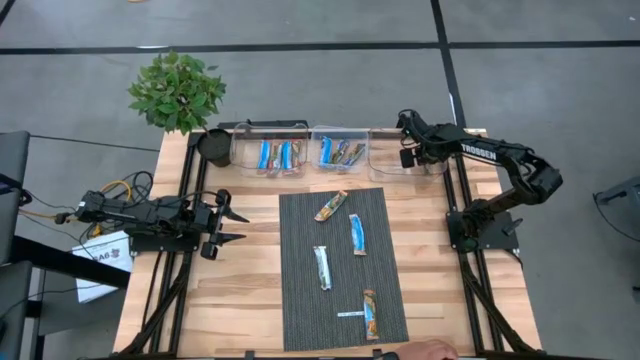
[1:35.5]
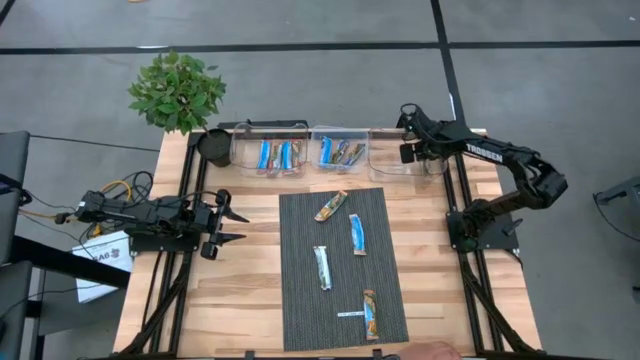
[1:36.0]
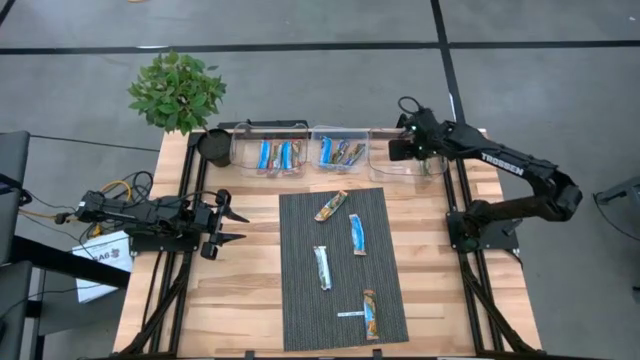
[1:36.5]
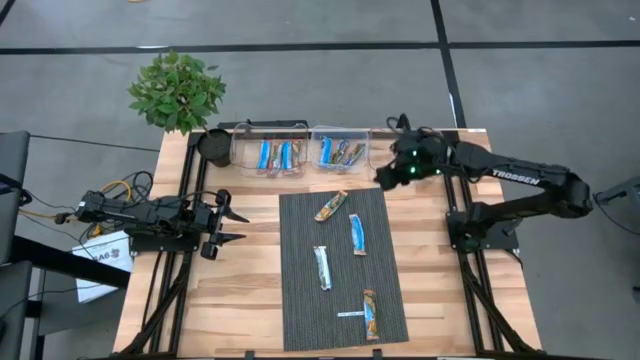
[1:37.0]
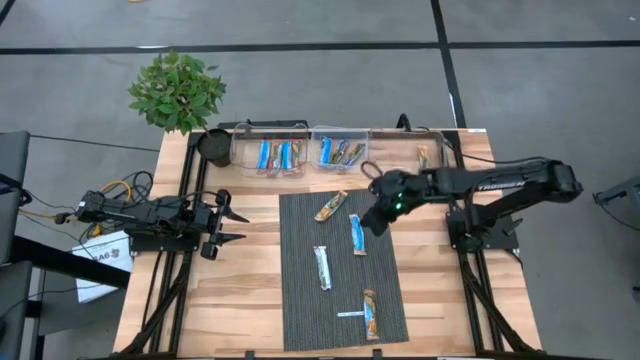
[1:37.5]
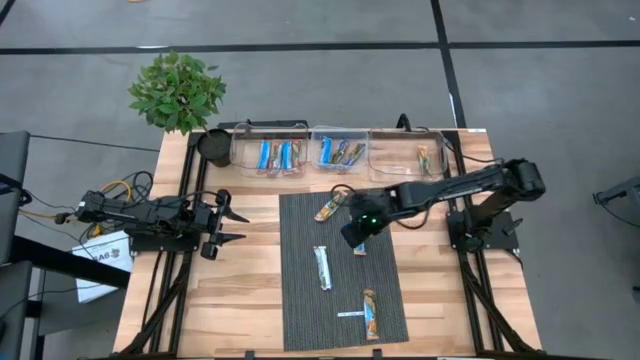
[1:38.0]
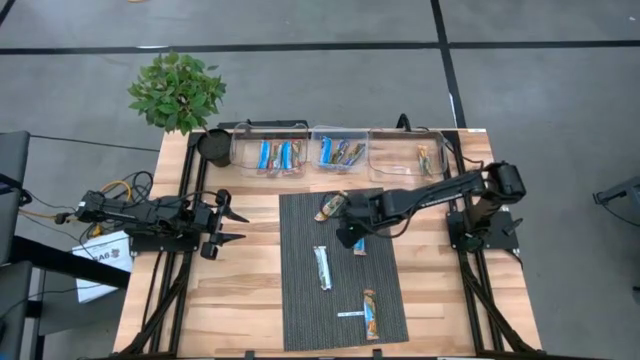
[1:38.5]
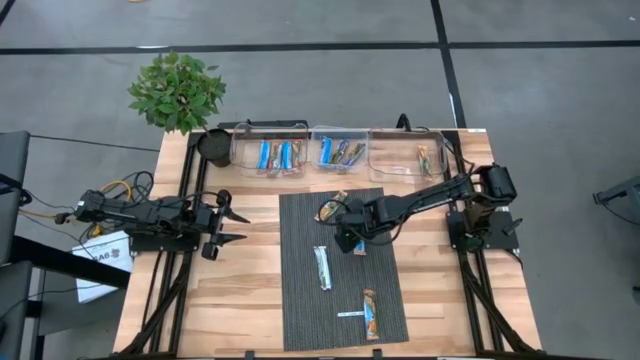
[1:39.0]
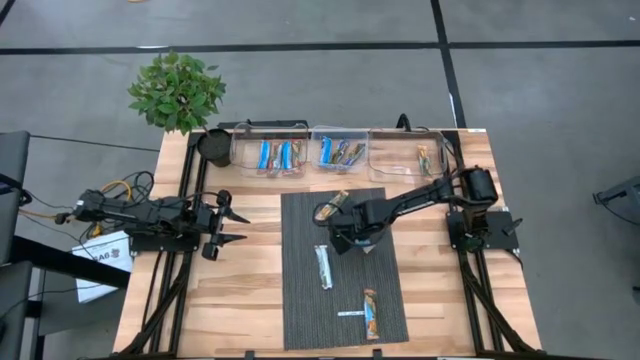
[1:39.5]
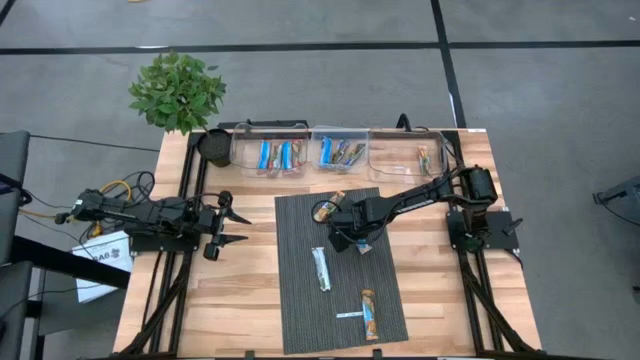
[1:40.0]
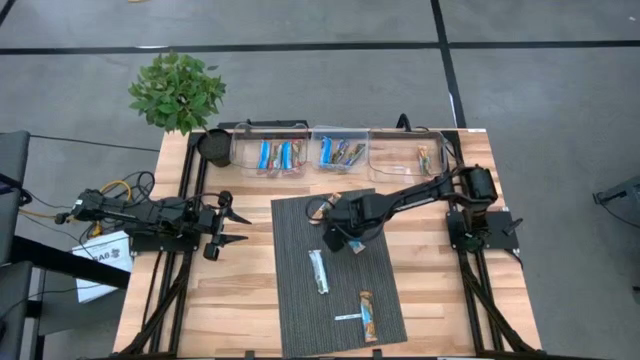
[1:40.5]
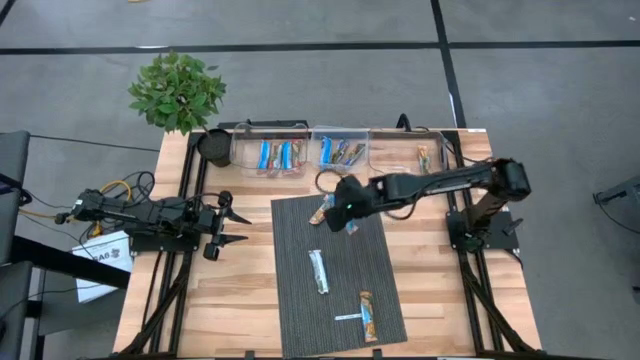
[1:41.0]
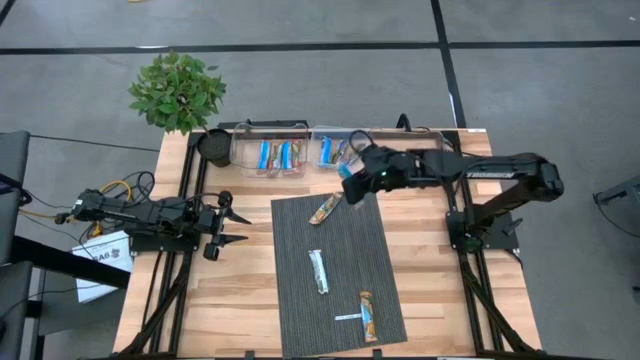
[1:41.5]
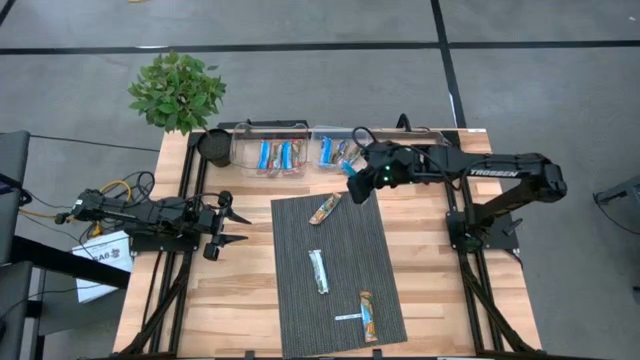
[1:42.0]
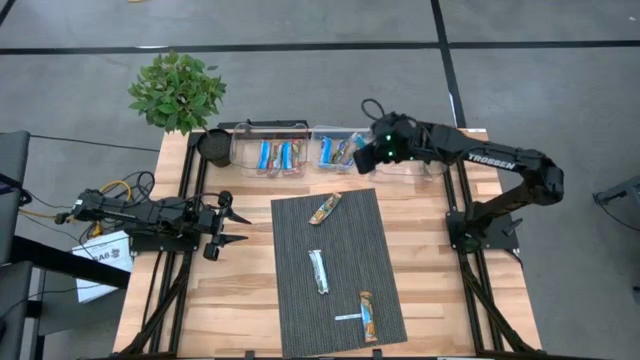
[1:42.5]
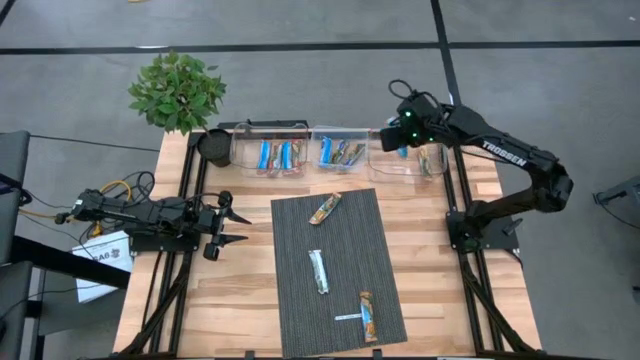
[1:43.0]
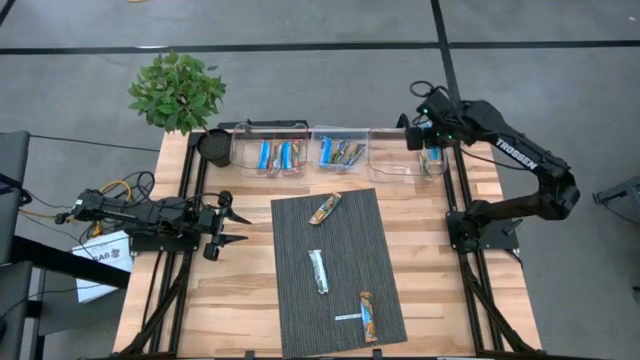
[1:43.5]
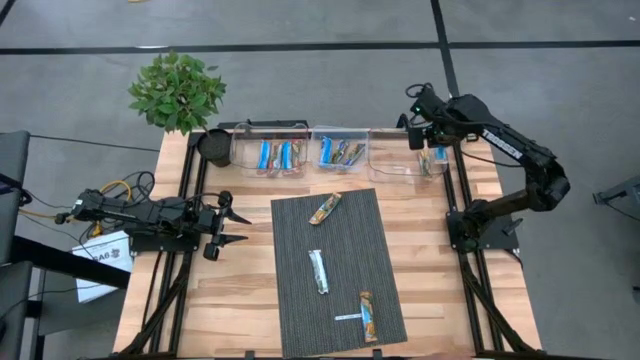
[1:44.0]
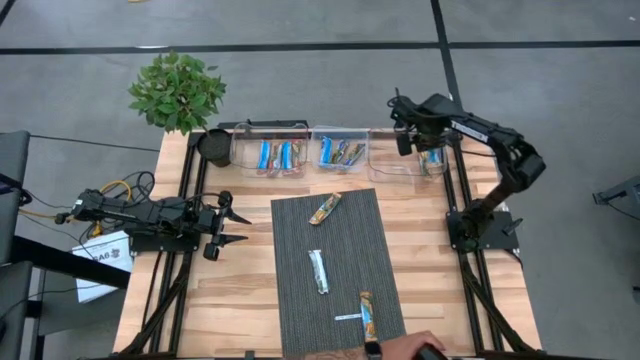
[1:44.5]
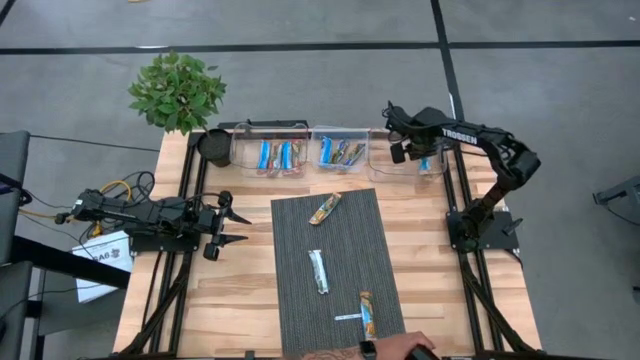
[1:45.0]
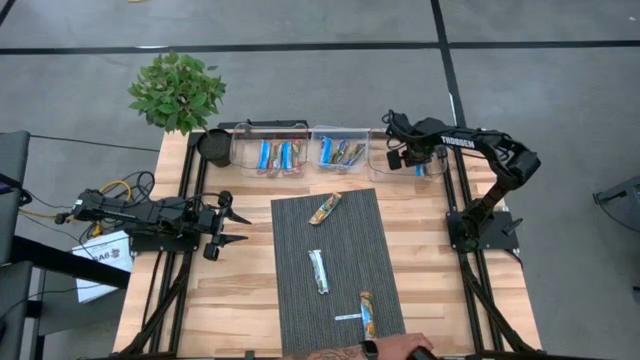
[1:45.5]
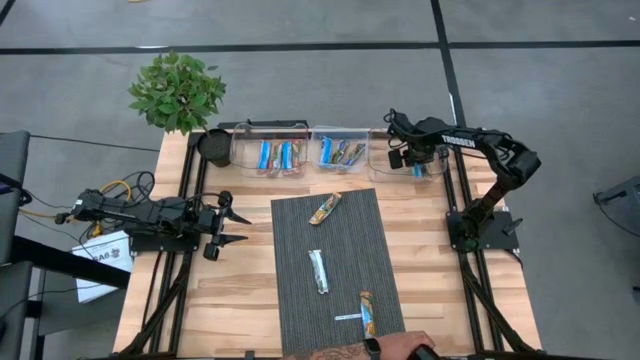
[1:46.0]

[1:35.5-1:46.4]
Task: Pick and place Granola Bars by type
Put the orange granola bar into the right transparent bin

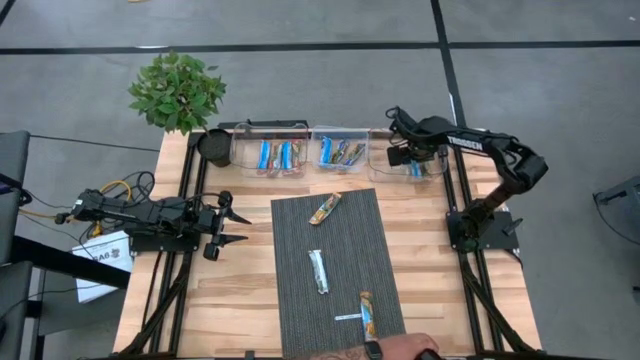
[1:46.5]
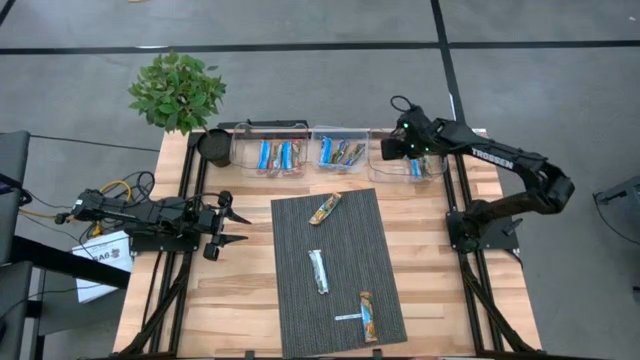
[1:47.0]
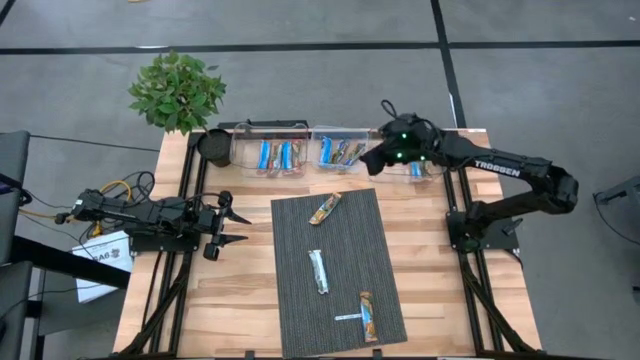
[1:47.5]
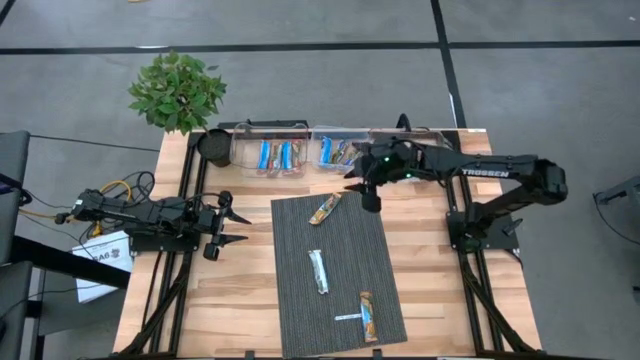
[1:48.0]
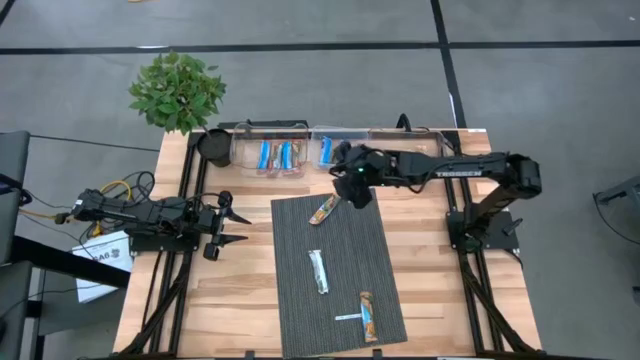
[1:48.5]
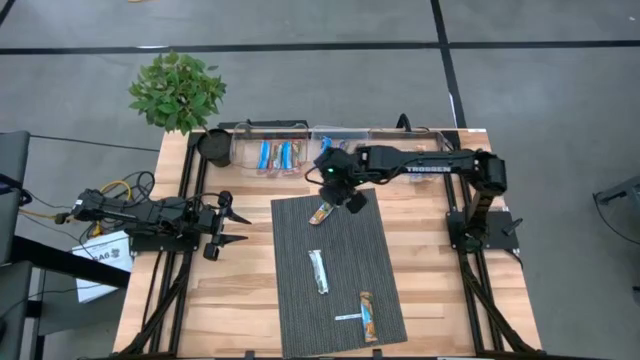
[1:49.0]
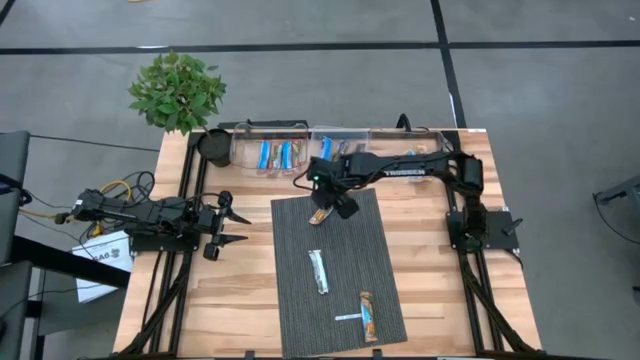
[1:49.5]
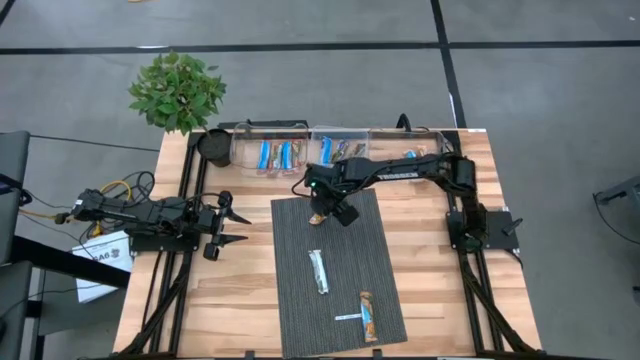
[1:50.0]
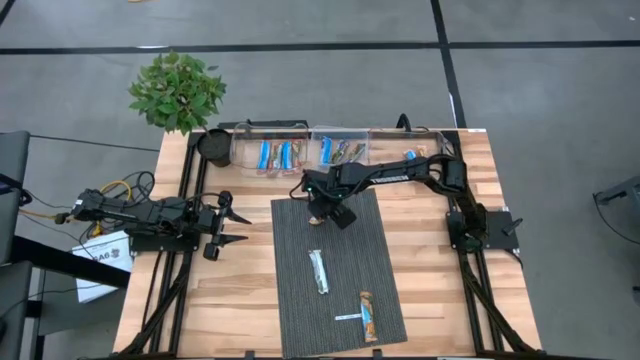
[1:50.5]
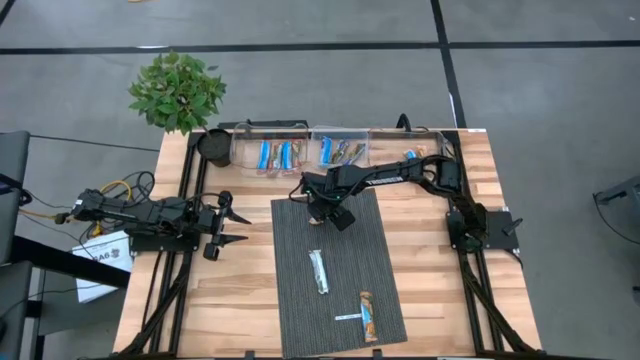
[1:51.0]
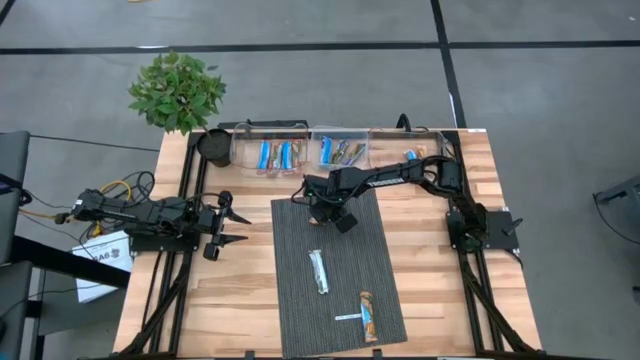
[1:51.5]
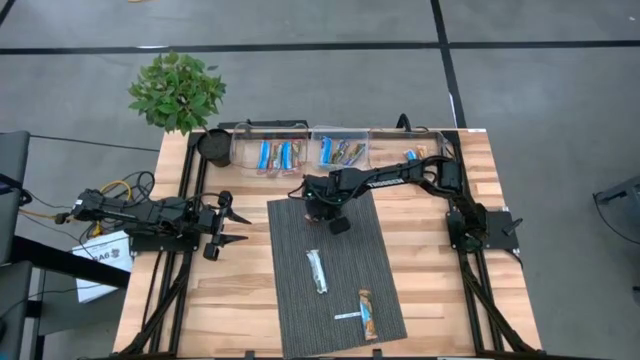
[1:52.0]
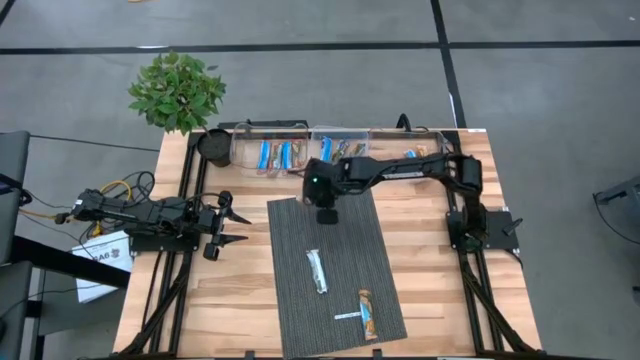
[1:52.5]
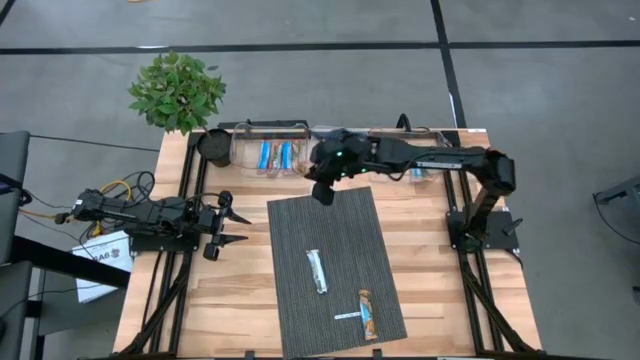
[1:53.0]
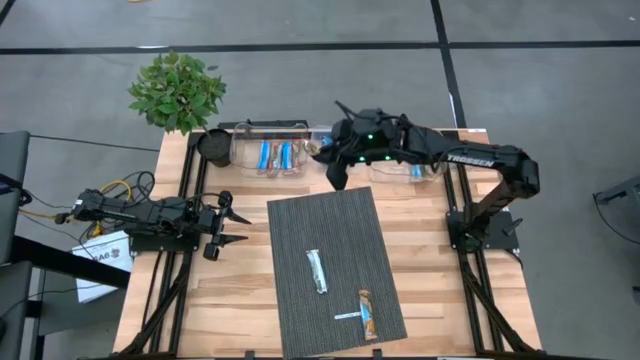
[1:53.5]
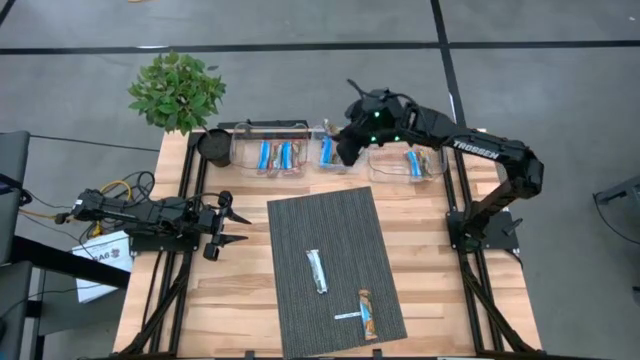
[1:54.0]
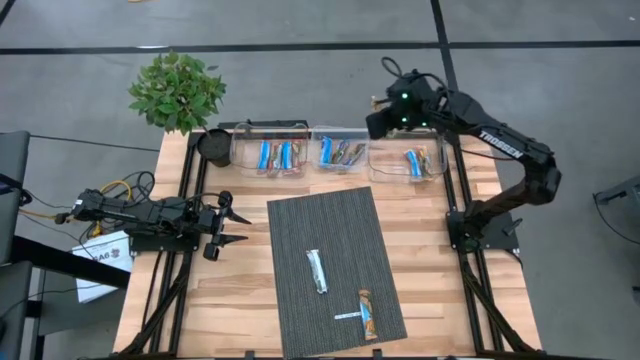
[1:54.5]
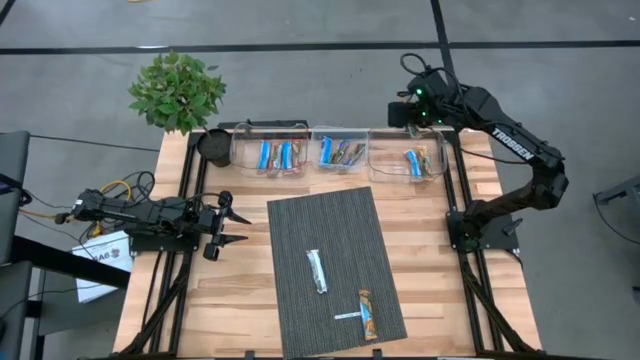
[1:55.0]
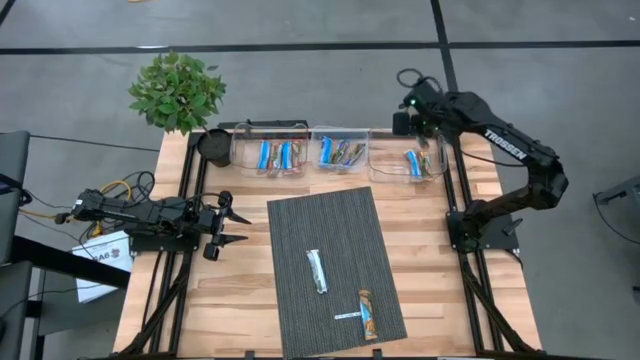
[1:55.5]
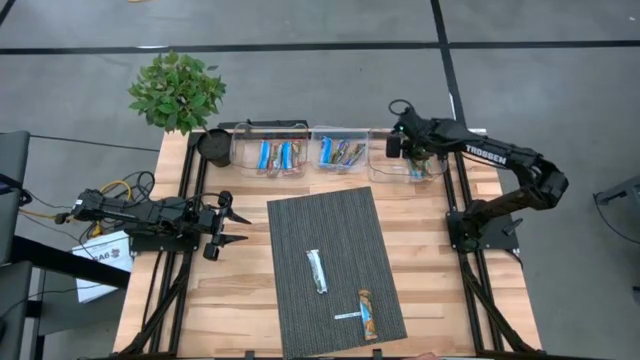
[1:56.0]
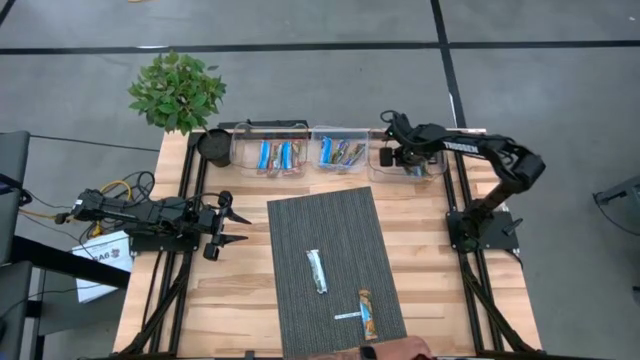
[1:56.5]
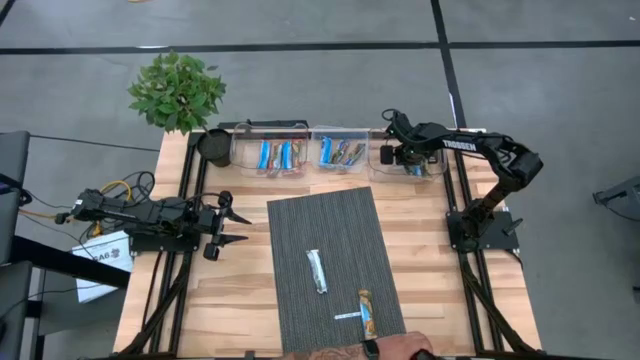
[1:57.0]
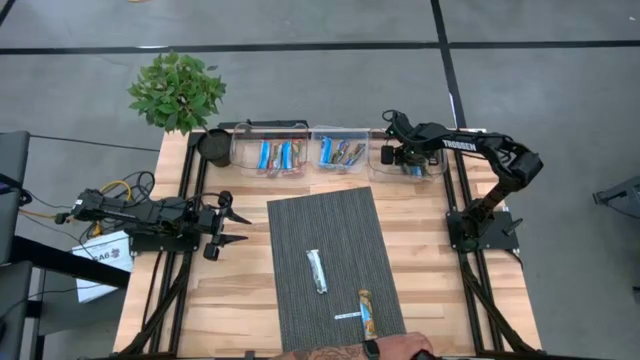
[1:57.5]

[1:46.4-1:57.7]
Put the orange granola bar into the right transparent bin
